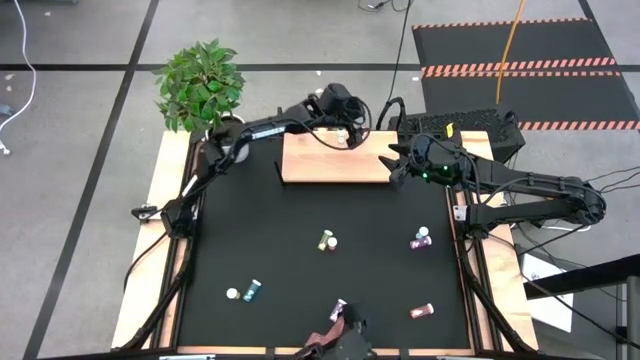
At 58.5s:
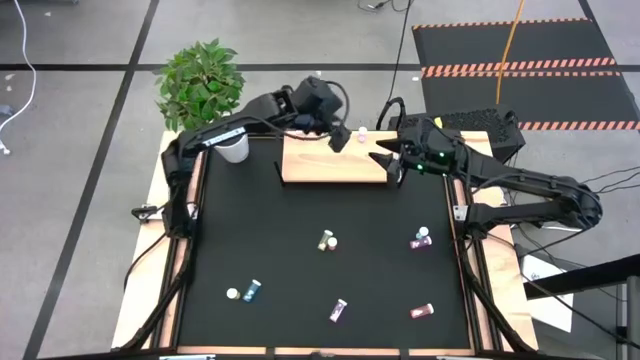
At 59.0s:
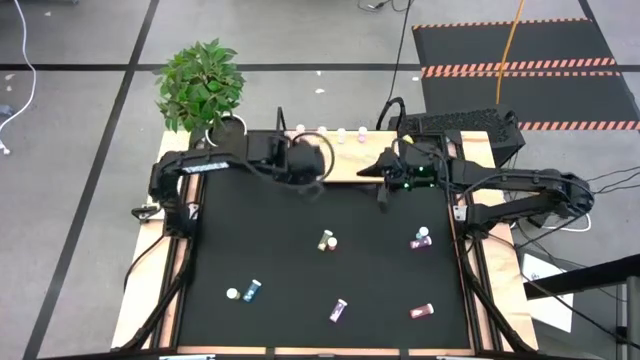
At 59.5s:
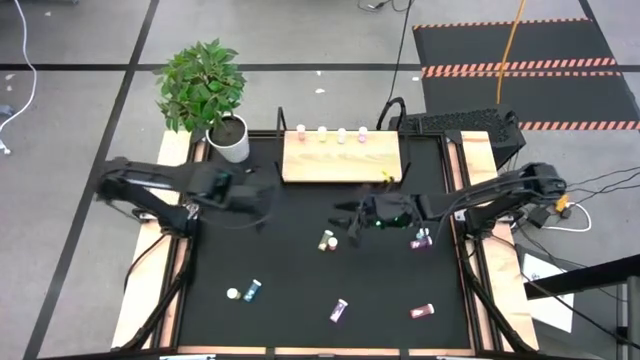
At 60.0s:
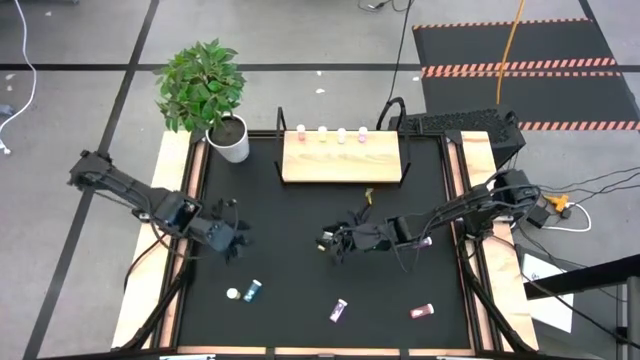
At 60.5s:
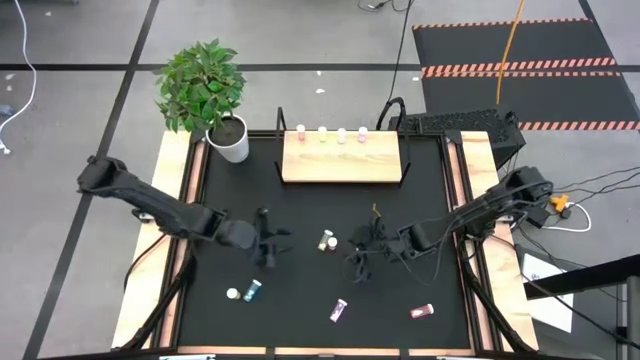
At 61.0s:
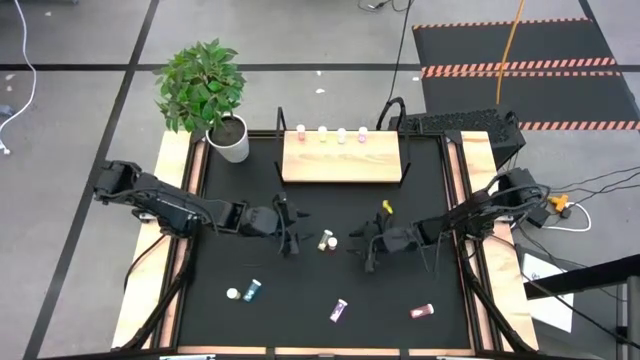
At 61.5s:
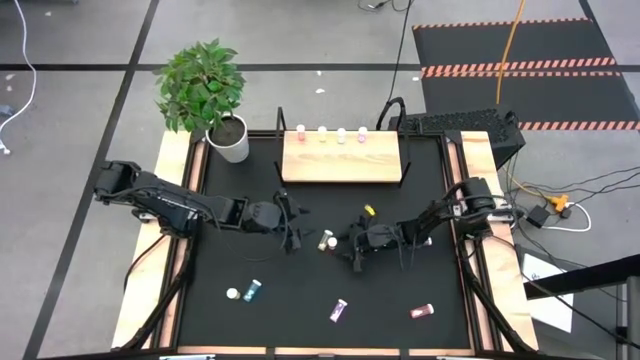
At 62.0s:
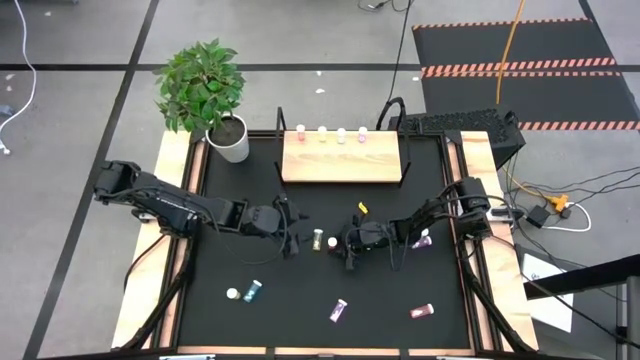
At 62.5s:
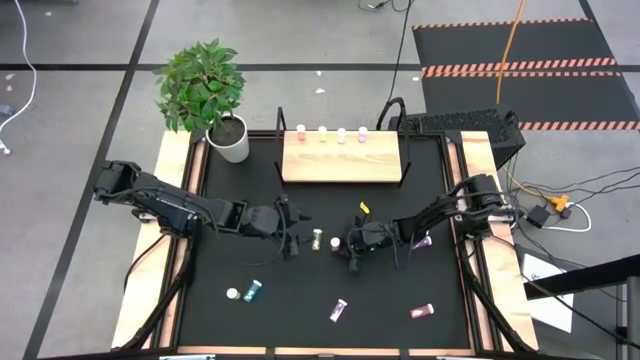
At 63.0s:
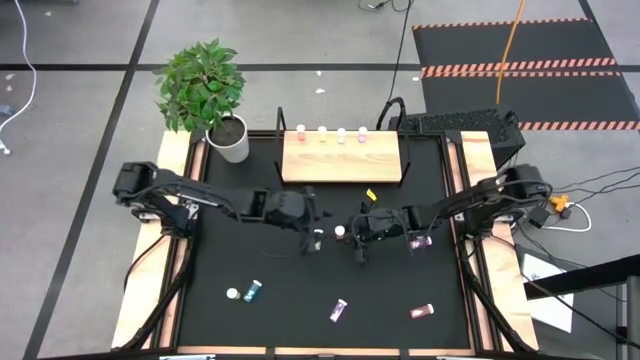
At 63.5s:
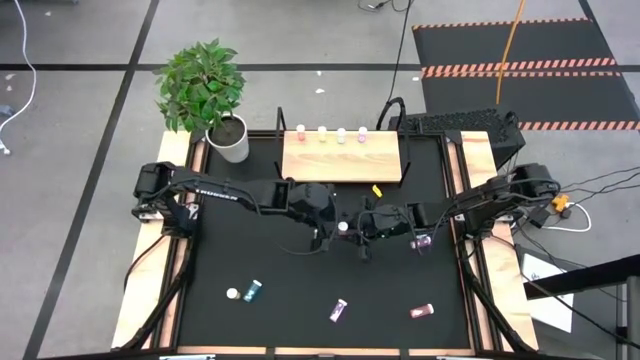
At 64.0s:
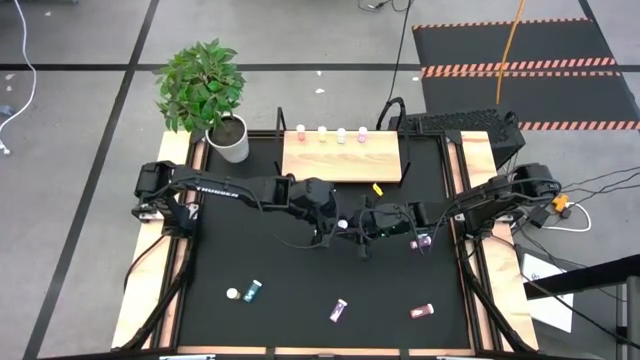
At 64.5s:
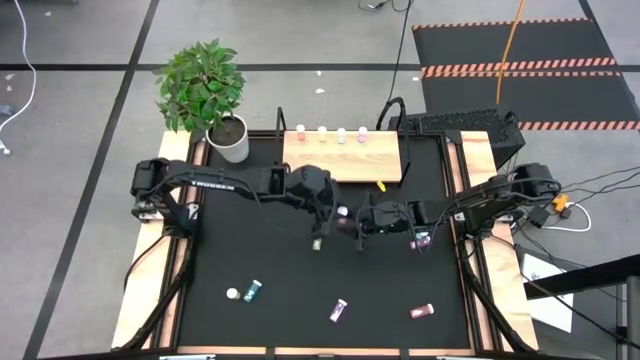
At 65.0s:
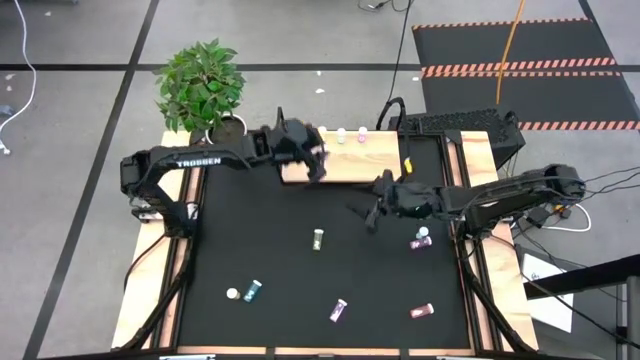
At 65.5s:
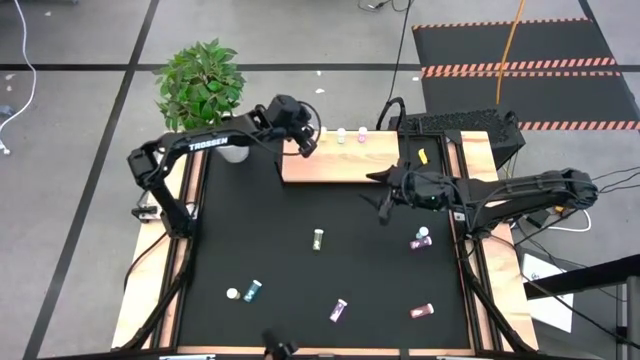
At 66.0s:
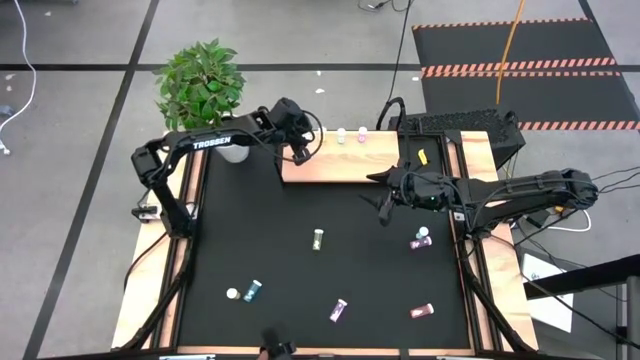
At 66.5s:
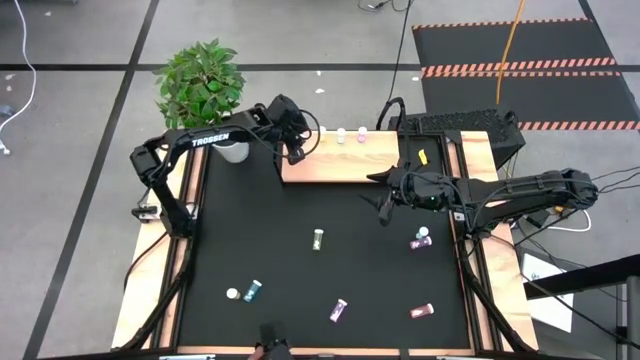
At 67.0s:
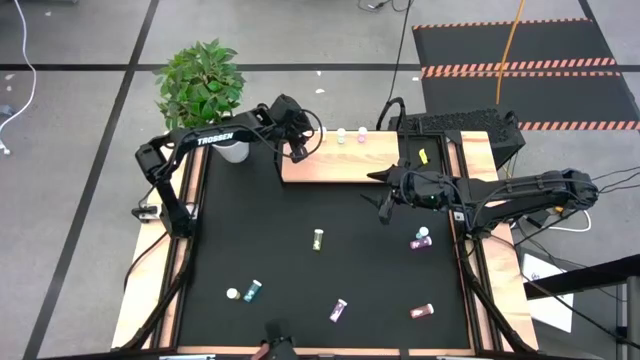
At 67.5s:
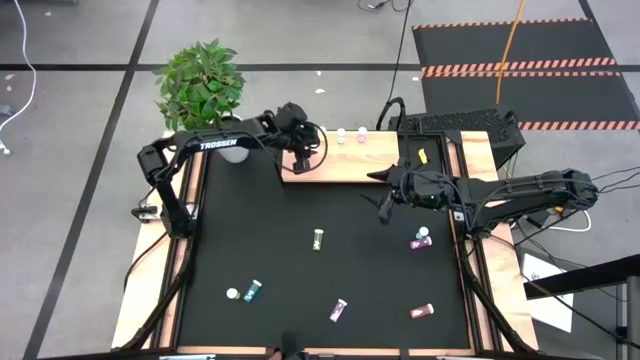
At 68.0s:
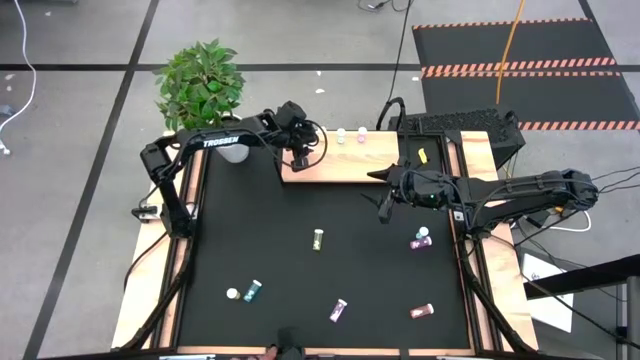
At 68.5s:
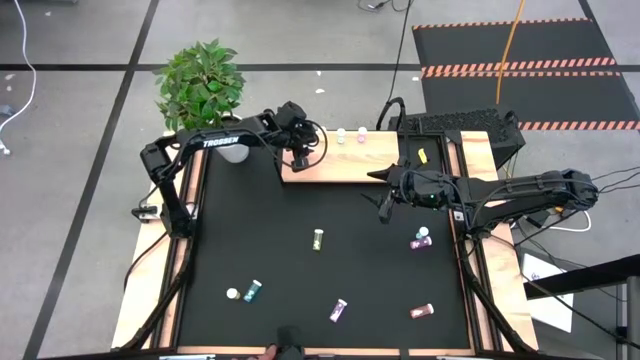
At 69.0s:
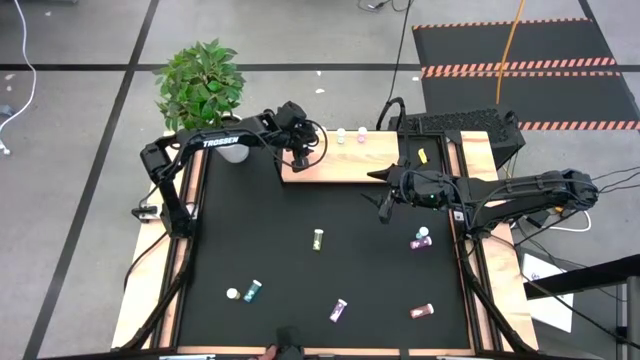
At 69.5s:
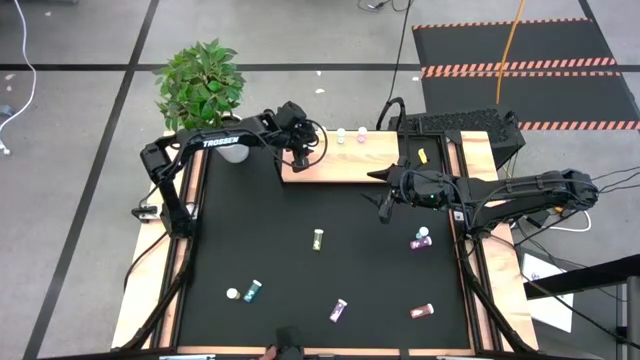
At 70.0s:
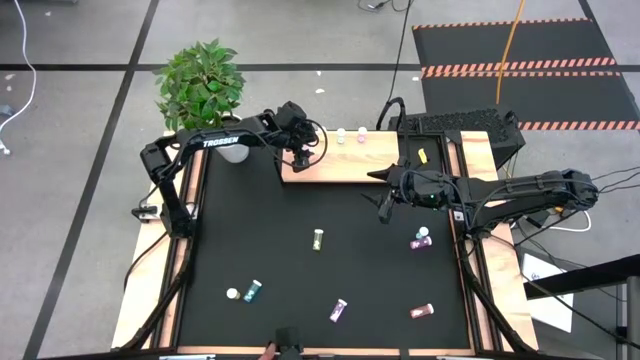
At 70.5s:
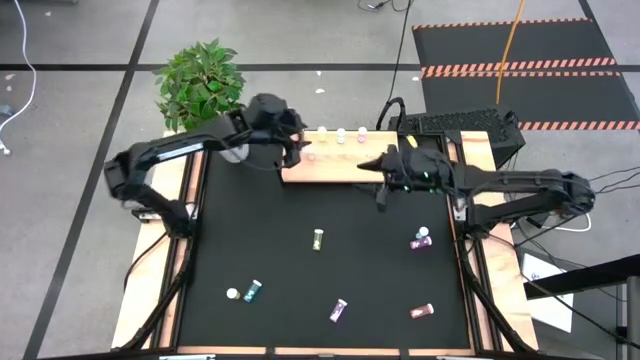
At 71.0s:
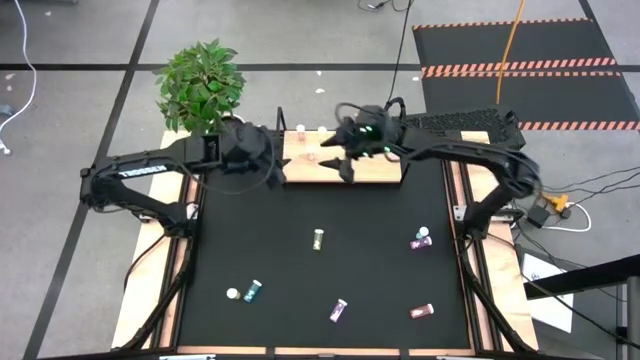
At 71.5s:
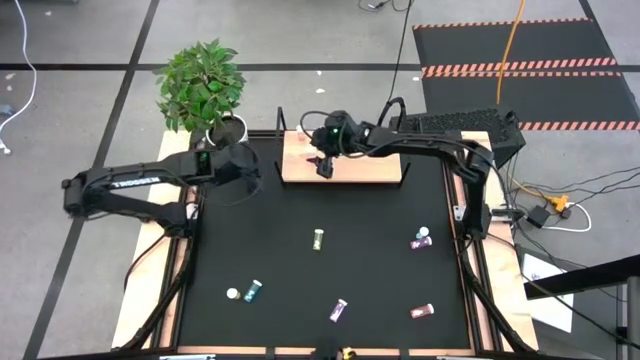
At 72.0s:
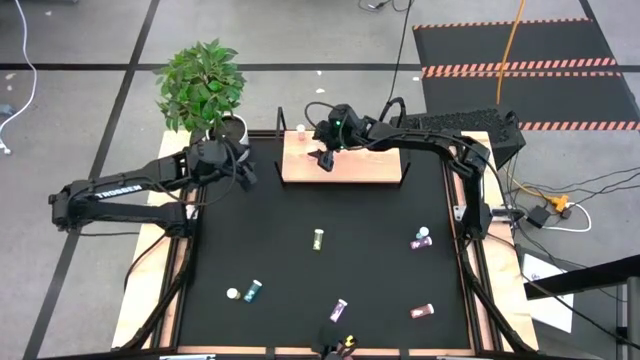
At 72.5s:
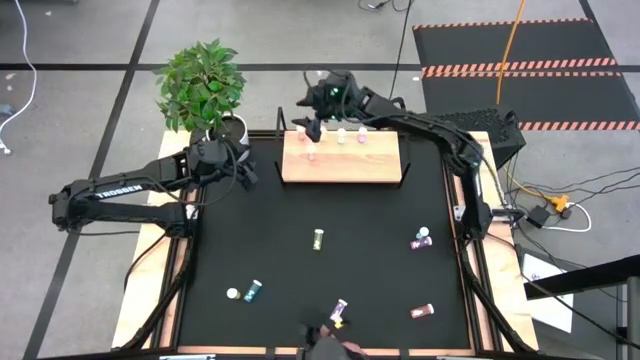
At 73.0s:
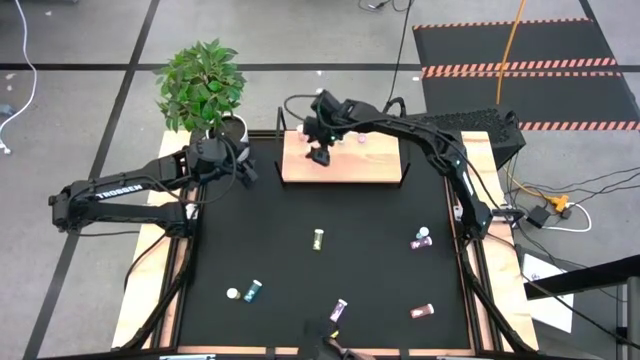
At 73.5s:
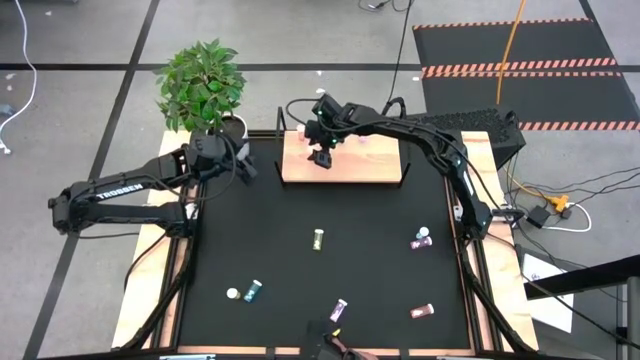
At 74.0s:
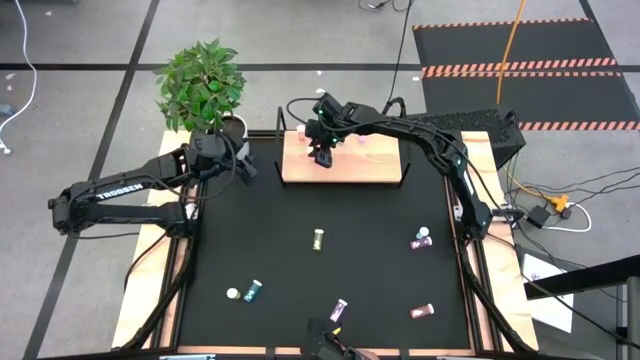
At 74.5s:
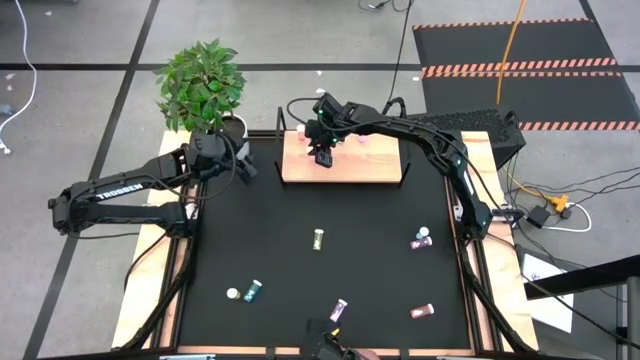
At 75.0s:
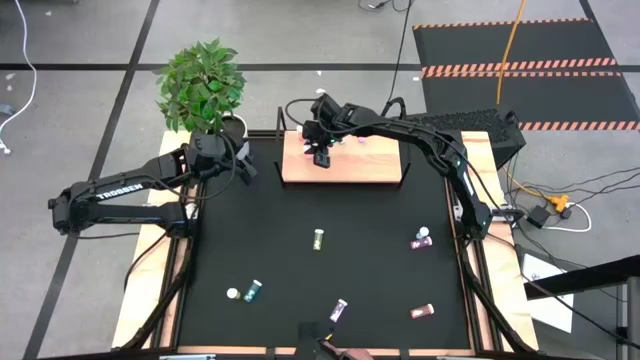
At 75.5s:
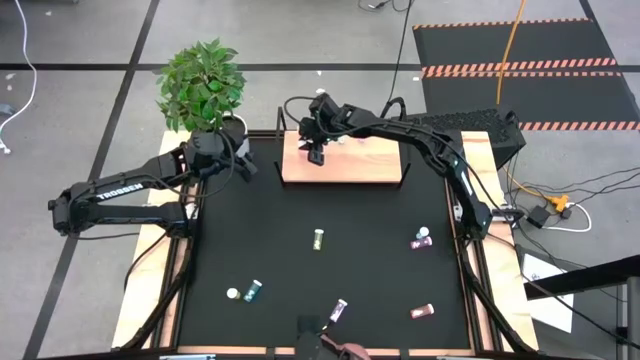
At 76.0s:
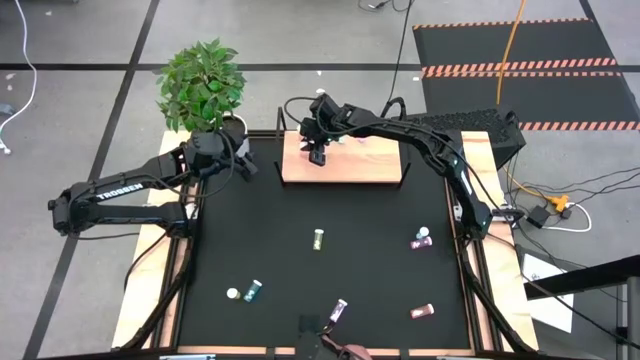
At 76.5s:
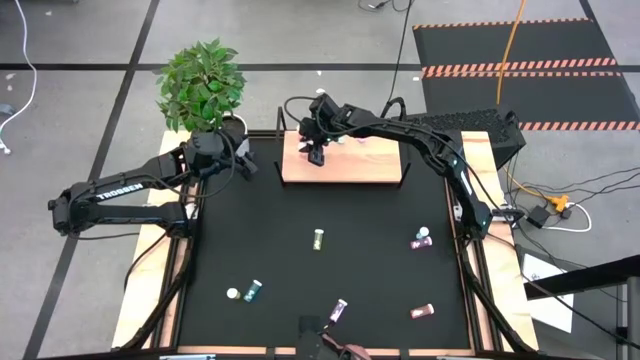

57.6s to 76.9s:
Task: Pick and place medicine bottles onto shelf by color
Put the left pink pill bottle on the shelf aligned with the other pink pill bottle

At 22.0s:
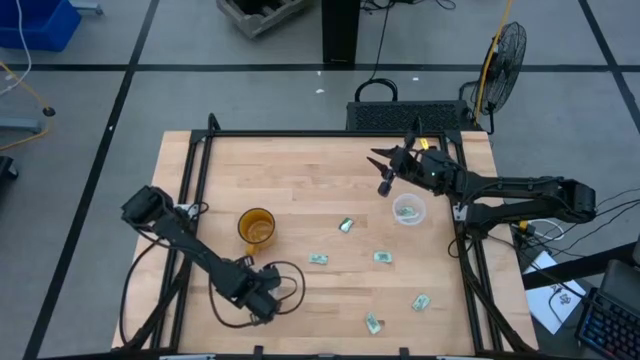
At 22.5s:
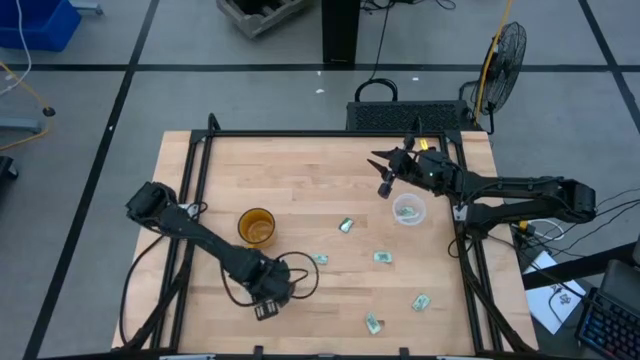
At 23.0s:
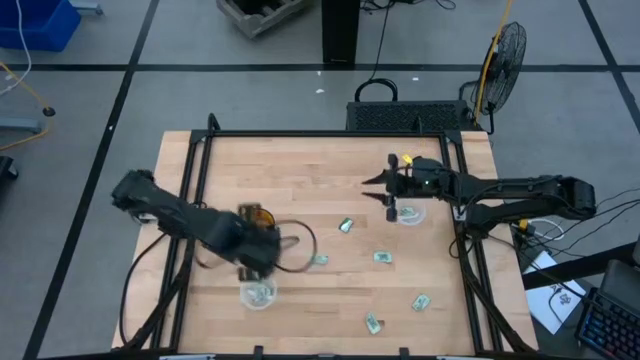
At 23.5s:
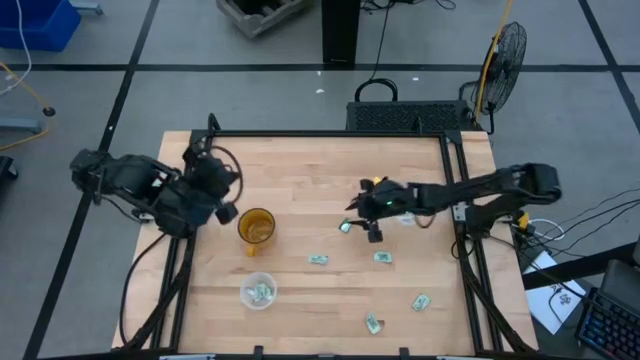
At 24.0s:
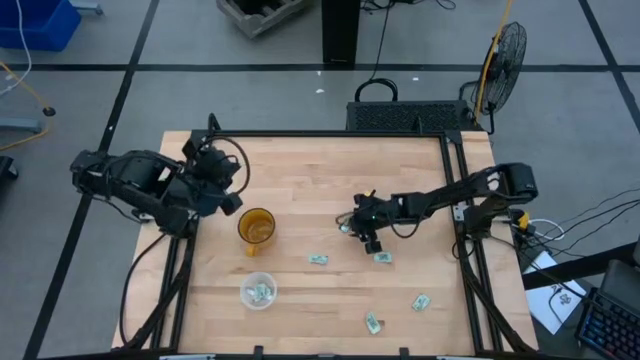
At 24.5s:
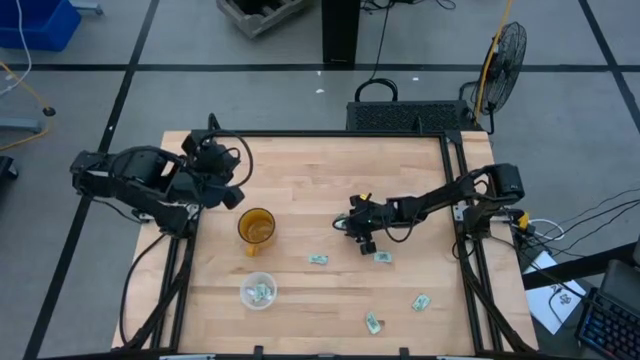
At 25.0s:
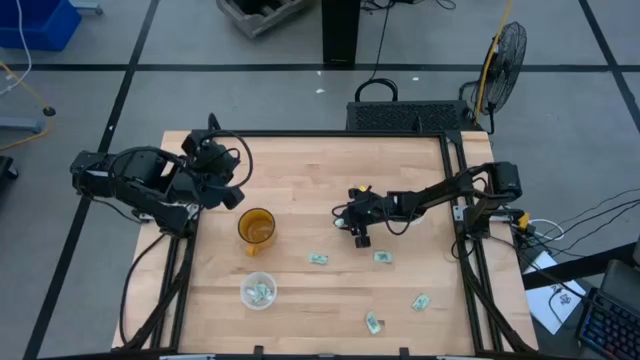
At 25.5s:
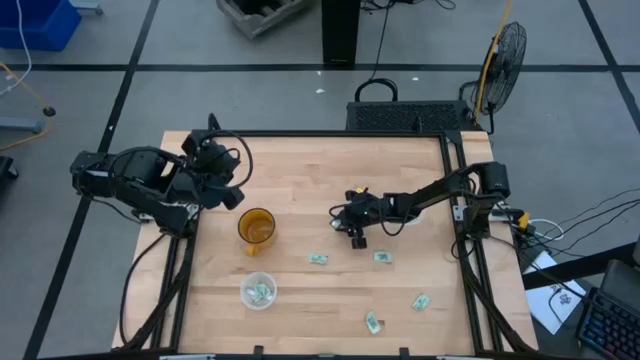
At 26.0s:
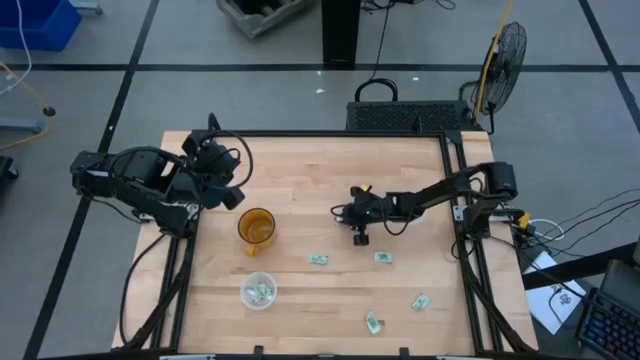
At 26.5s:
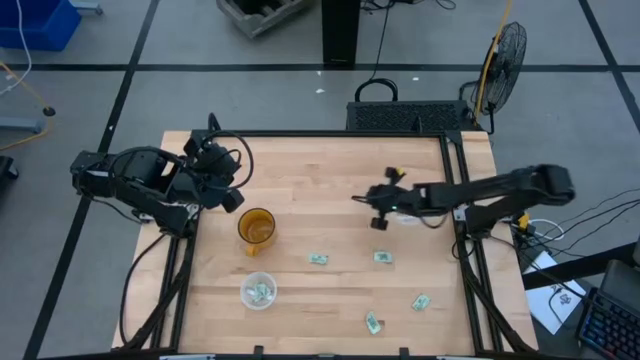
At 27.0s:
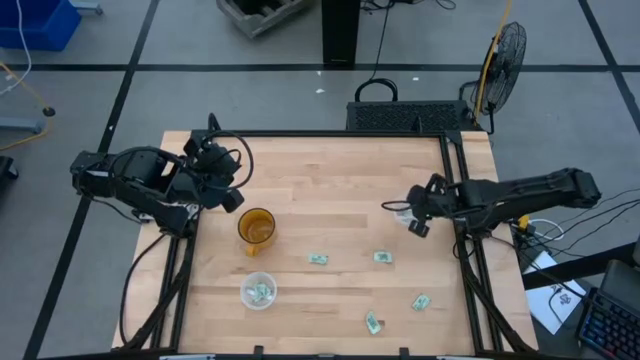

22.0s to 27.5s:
Task: Pick and place Stevia / Truvia into bins
Put the truvia packet into the top transparent container
